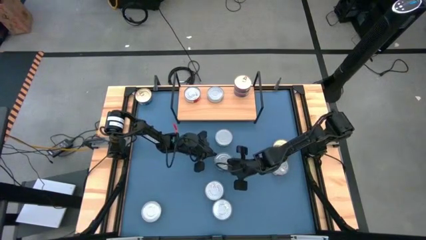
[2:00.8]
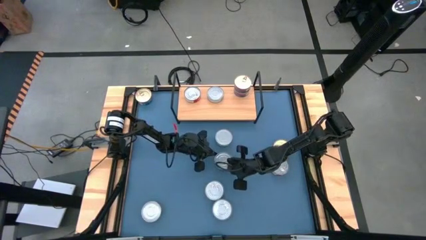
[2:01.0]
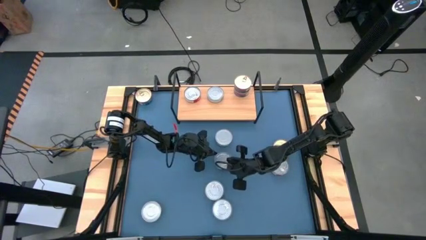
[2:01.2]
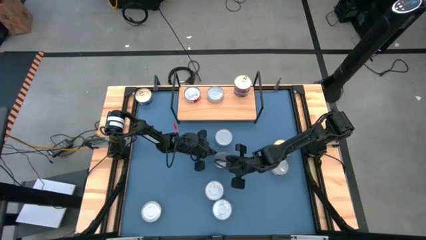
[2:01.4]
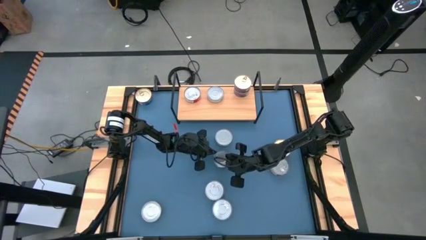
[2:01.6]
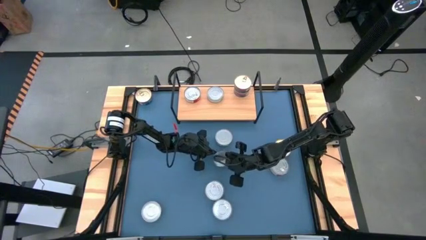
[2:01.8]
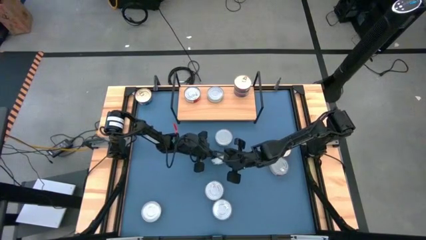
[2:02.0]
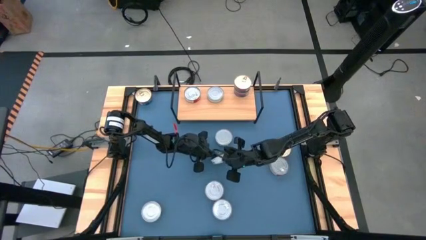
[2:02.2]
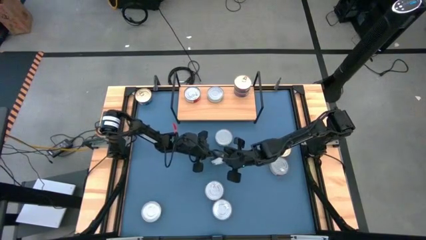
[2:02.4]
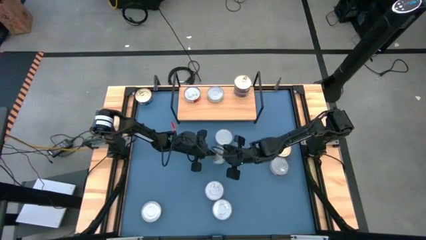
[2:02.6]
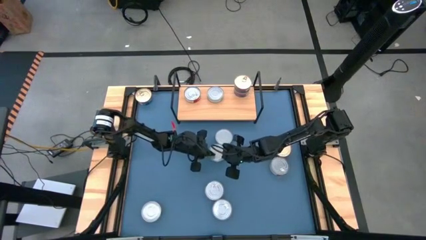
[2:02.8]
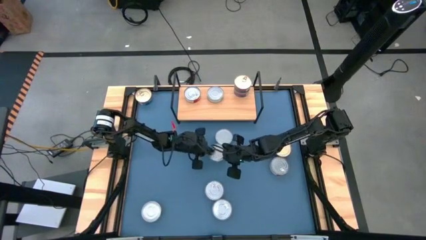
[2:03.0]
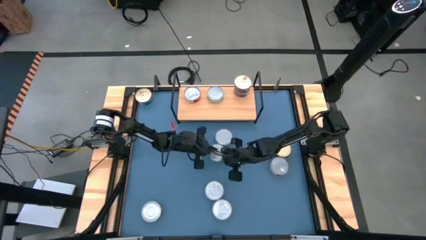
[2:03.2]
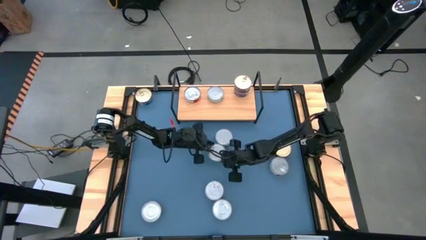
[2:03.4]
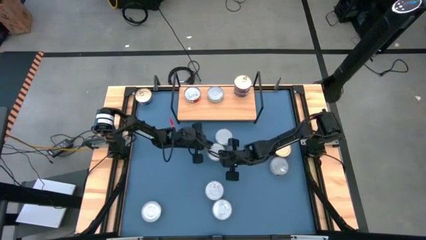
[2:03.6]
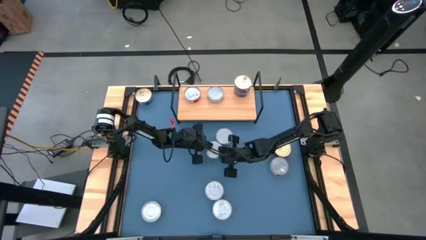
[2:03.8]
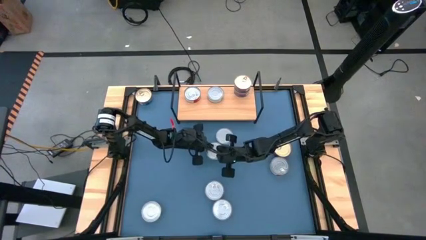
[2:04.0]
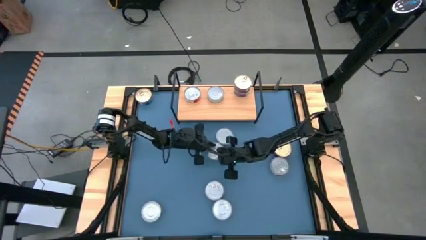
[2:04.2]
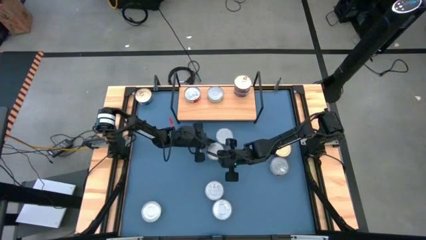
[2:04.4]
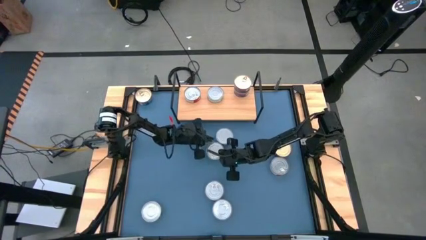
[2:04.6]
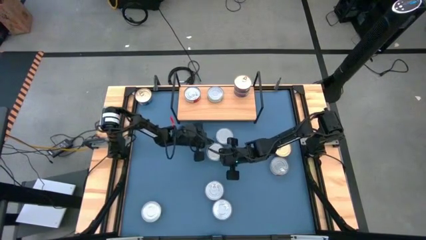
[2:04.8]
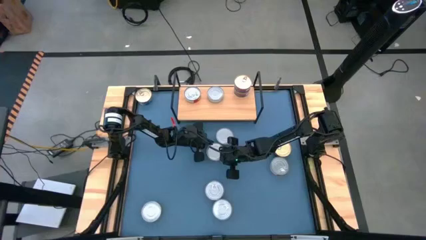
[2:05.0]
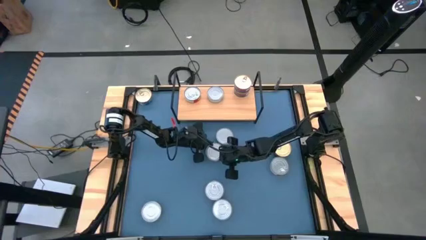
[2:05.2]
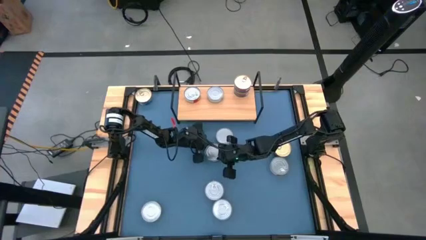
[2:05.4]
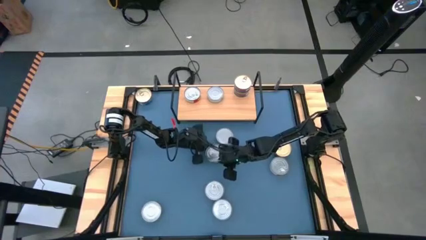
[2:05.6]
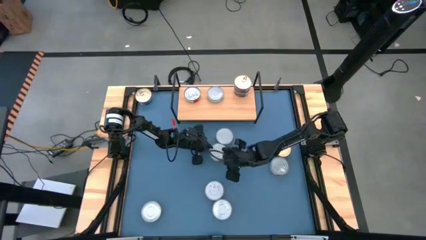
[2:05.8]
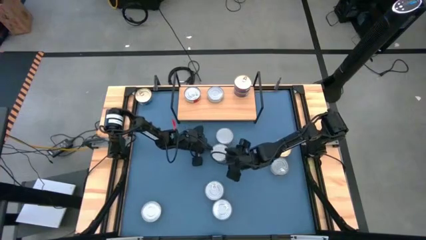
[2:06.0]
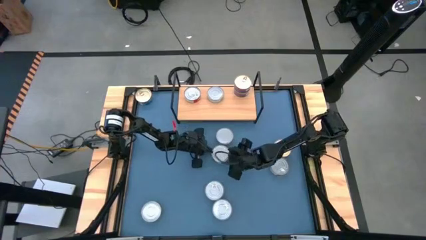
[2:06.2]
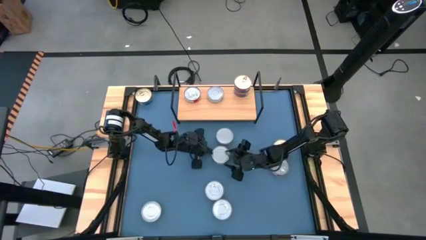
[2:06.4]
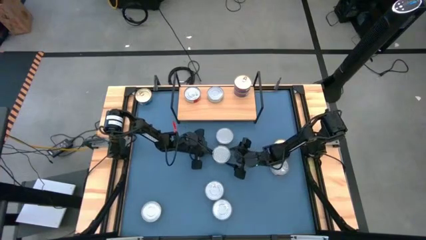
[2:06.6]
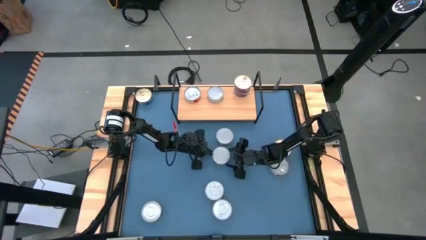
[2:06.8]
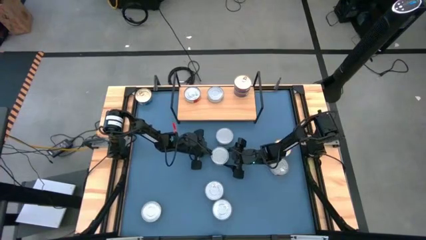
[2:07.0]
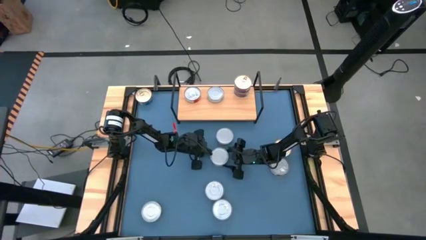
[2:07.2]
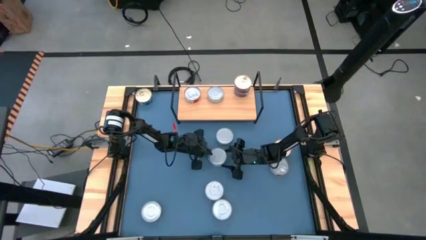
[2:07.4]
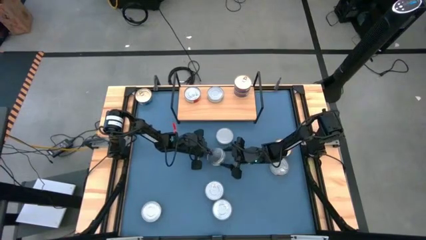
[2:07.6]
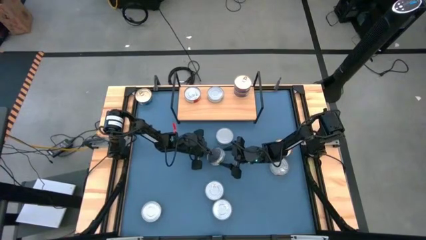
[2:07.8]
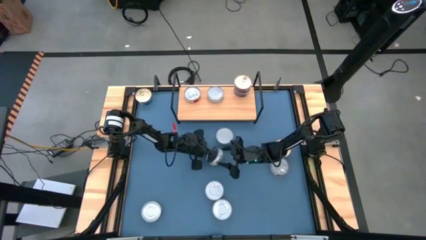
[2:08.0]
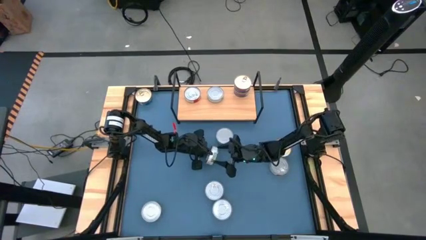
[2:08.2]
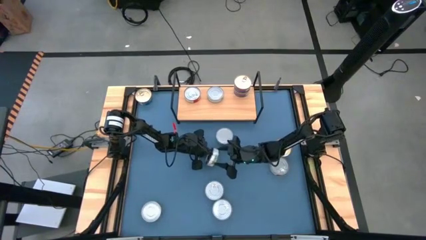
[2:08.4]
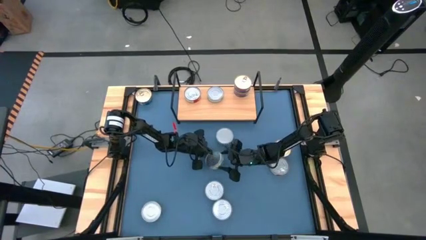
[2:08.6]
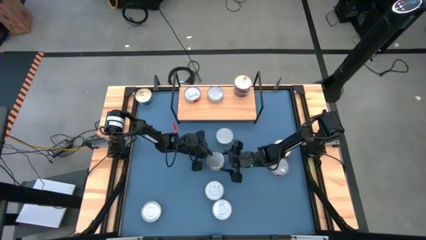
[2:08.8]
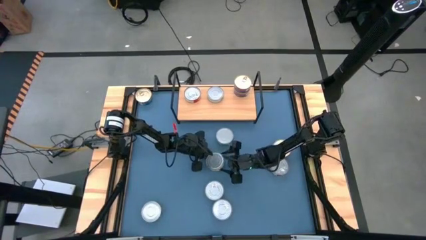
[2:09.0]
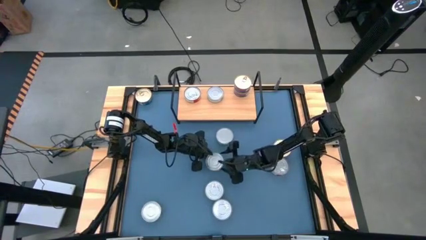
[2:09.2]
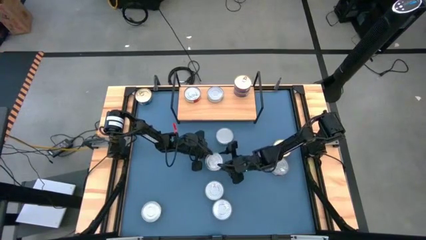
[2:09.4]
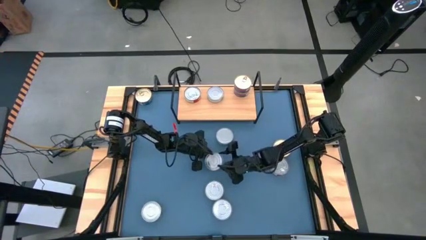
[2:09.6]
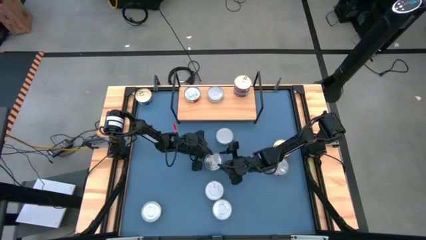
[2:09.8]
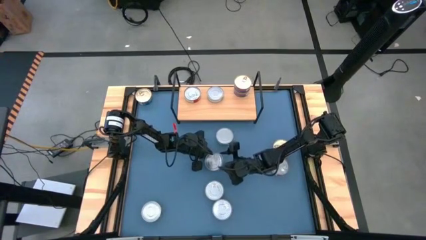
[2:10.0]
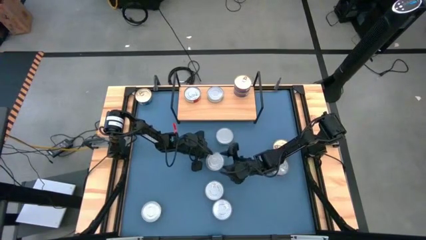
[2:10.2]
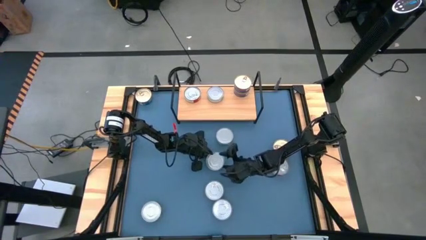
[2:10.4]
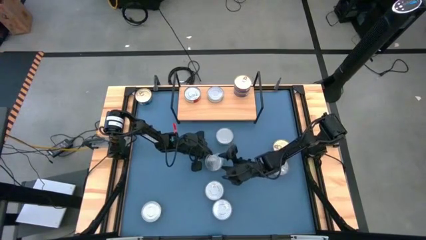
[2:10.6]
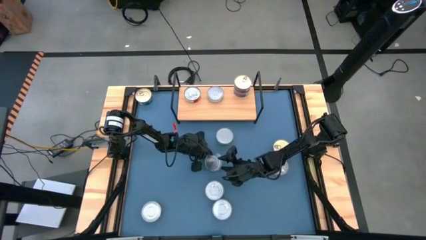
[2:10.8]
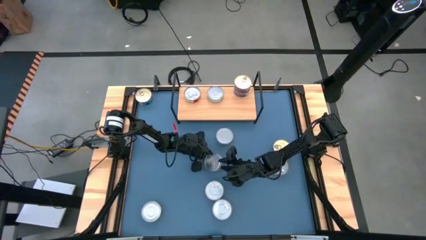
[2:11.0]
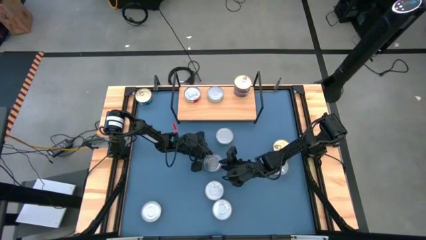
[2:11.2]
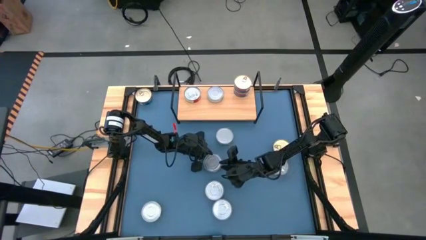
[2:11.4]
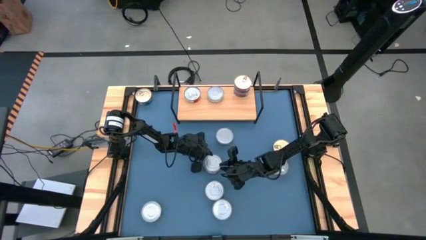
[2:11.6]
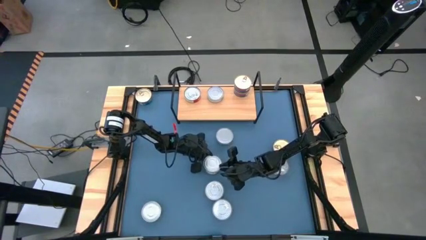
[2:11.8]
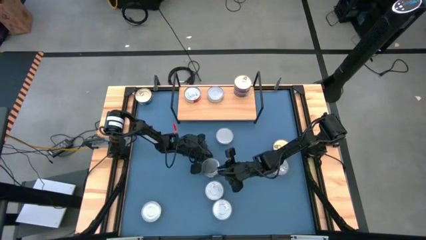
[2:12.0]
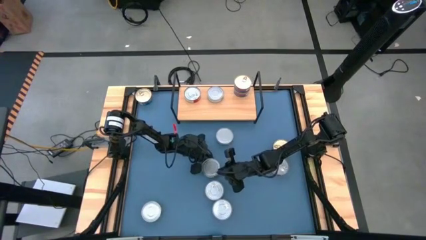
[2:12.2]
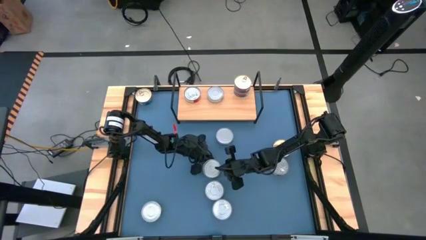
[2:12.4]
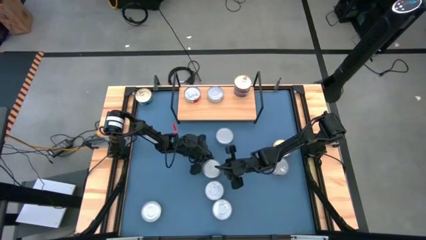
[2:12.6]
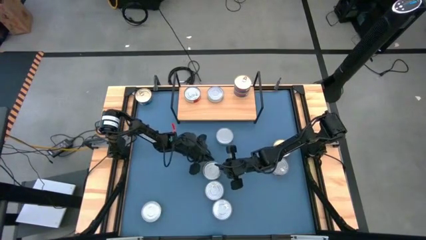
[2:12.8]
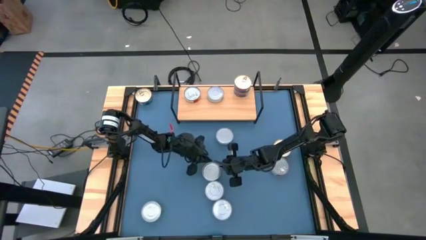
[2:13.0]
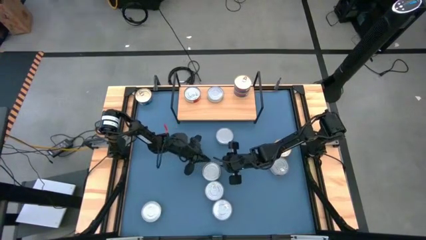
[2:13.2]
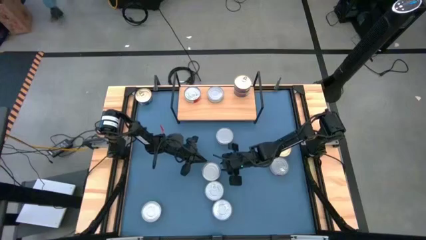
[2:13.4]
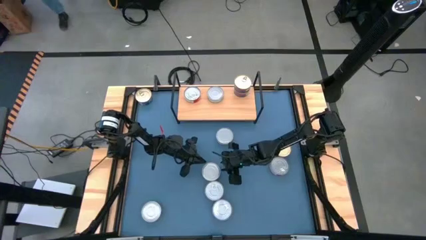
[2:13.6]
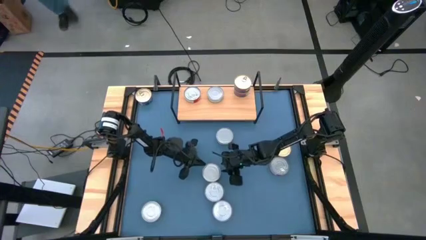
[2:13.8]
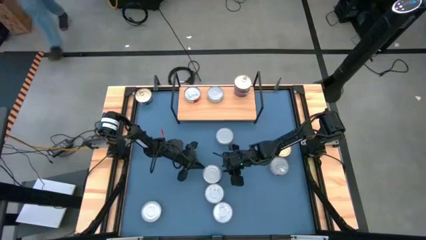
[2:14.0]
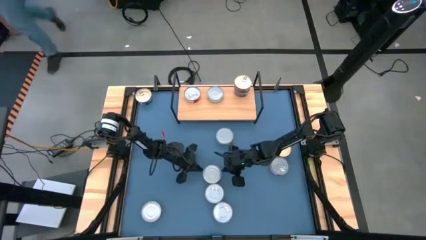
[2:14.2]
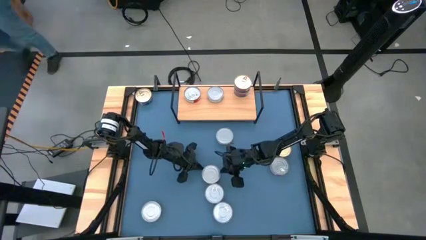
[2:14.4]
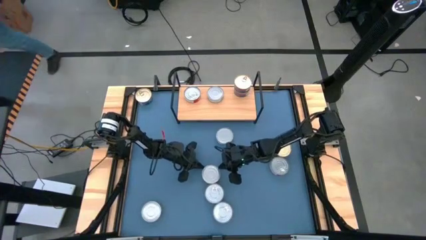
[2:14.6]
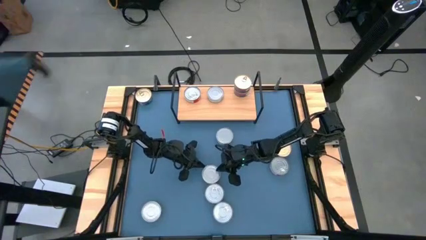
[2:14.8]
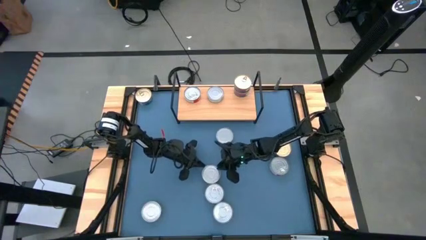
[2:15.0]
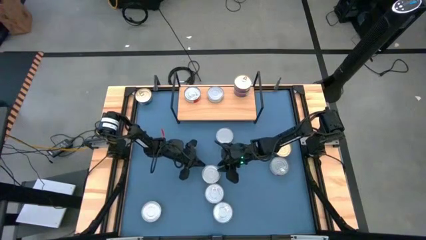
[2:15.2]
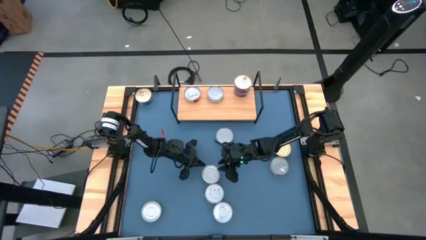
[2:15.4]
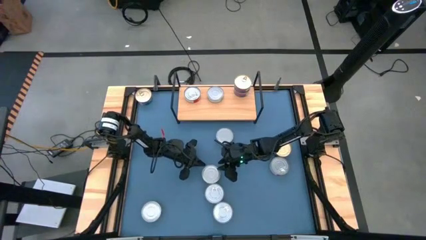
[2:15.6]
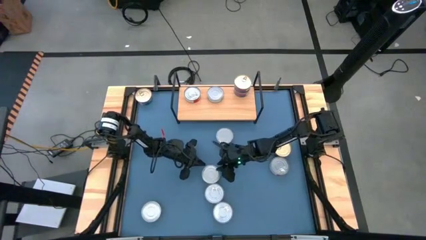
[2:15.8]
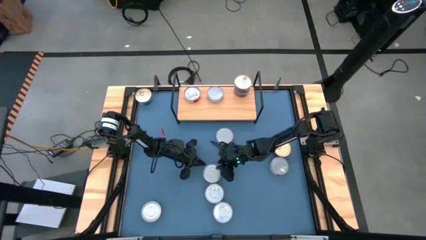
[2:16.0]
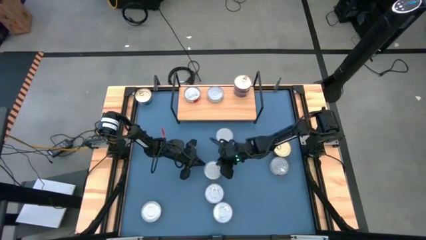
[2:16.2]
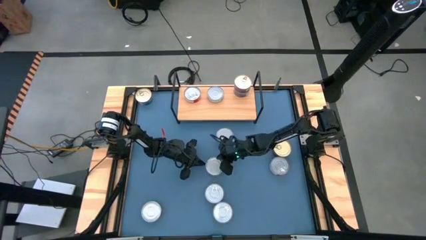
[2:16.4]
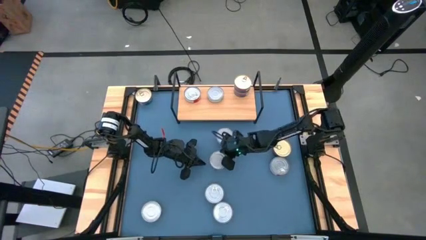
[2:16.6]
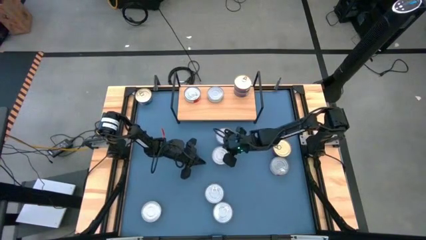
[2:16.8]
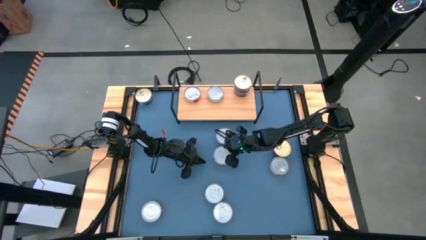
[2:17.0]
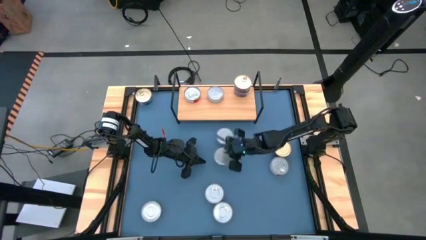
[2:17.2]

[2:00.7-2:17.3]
Task: Stack canned seafood by type on shelf
Stack the green tuna can on top of the green tuna can on the shelf
